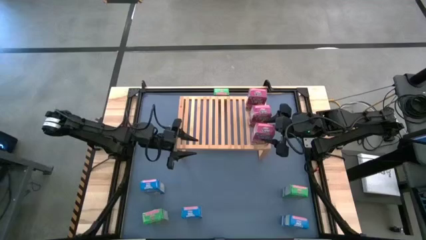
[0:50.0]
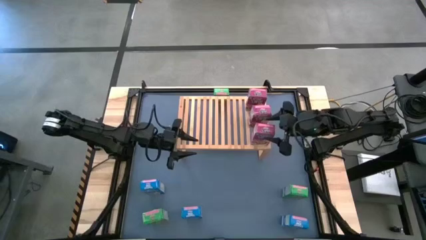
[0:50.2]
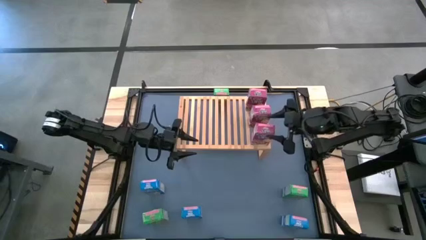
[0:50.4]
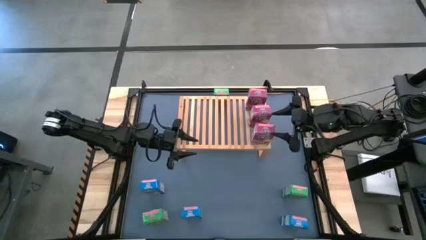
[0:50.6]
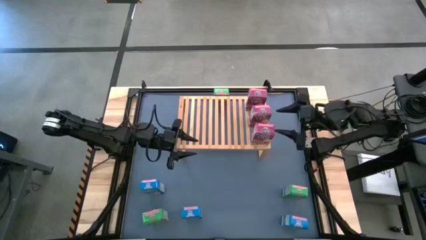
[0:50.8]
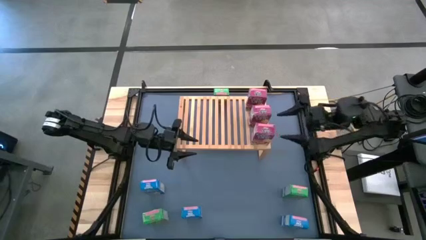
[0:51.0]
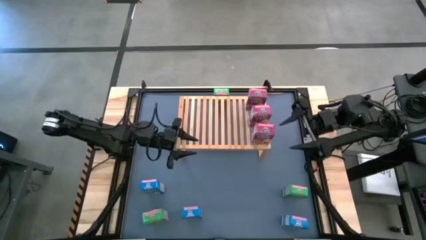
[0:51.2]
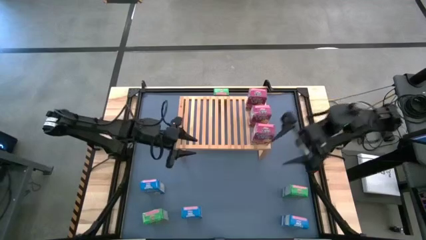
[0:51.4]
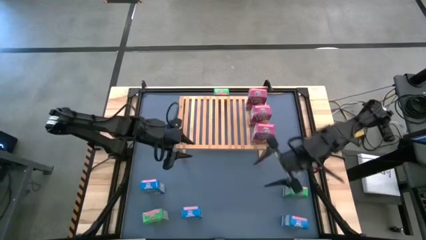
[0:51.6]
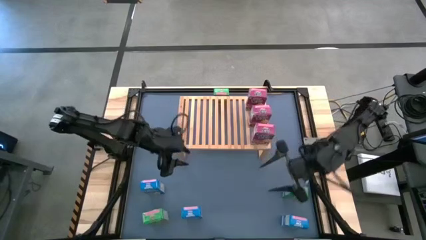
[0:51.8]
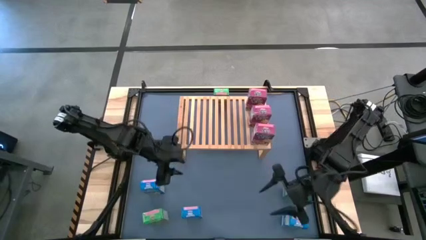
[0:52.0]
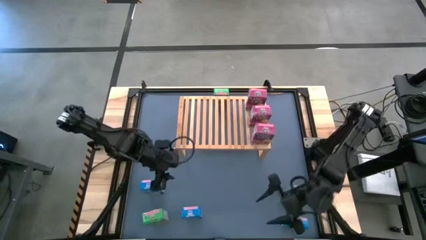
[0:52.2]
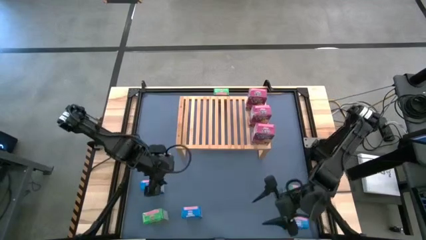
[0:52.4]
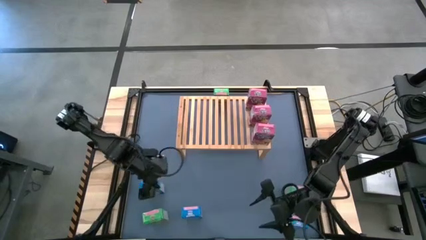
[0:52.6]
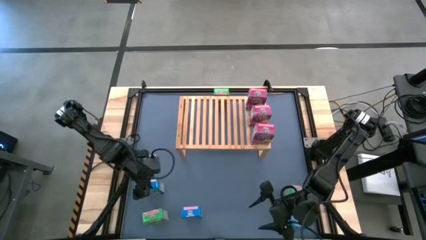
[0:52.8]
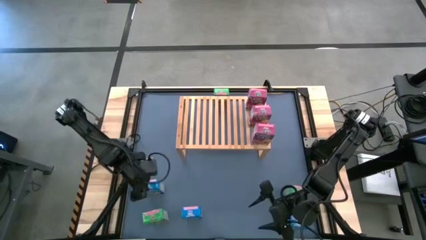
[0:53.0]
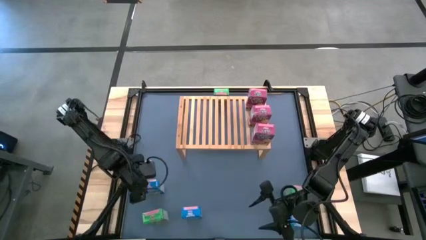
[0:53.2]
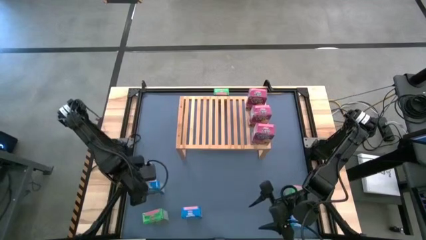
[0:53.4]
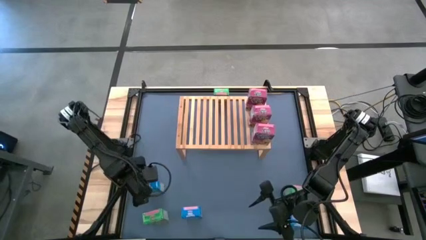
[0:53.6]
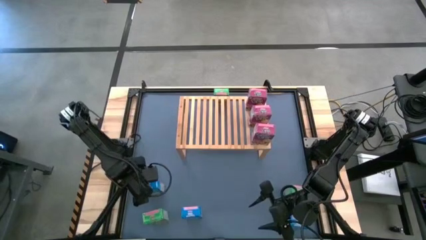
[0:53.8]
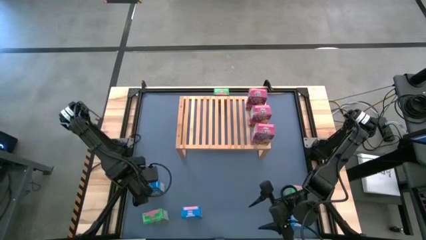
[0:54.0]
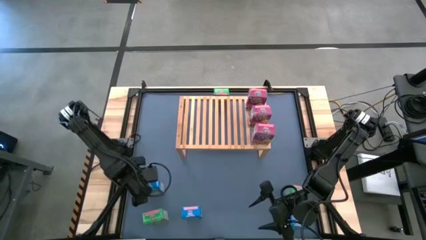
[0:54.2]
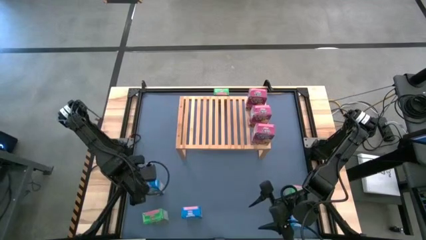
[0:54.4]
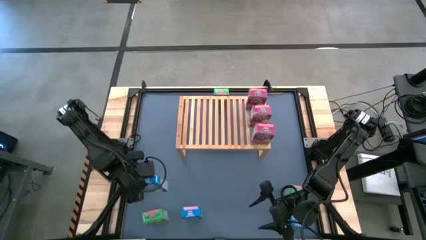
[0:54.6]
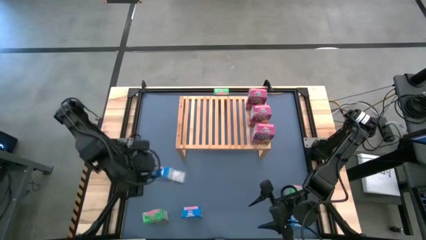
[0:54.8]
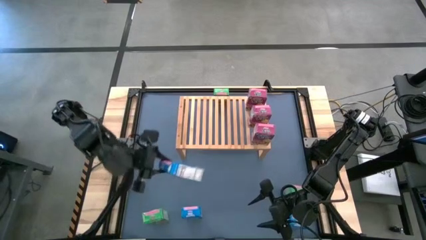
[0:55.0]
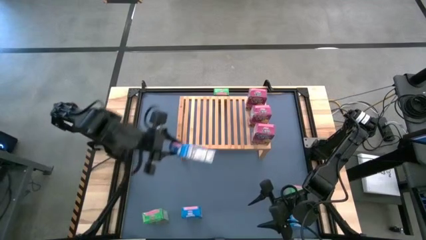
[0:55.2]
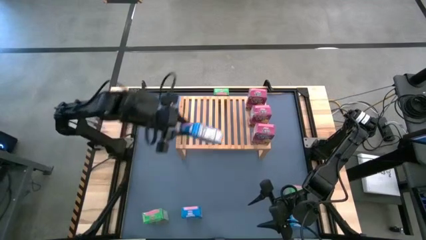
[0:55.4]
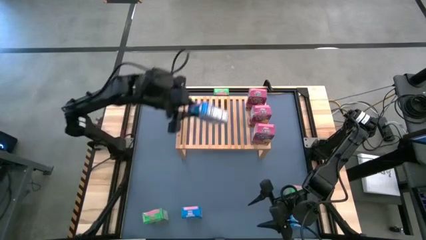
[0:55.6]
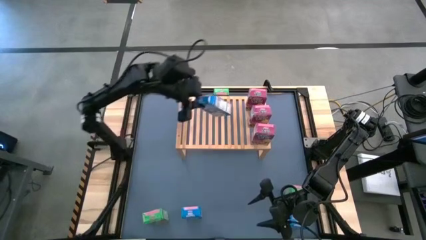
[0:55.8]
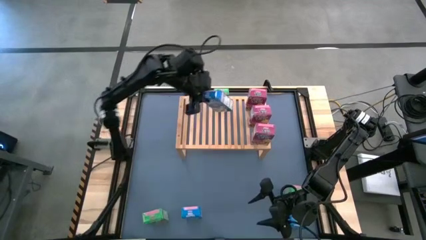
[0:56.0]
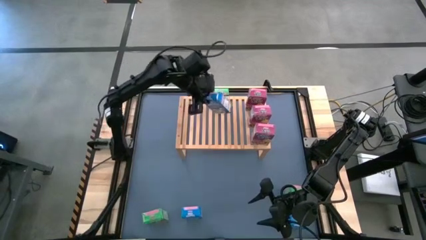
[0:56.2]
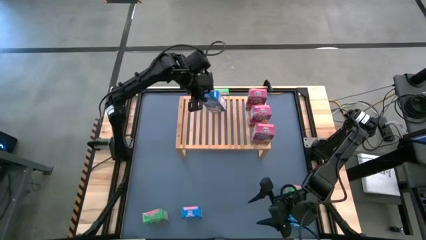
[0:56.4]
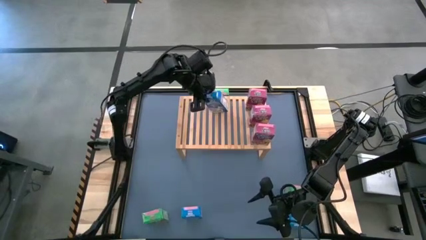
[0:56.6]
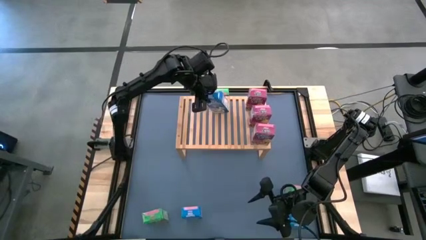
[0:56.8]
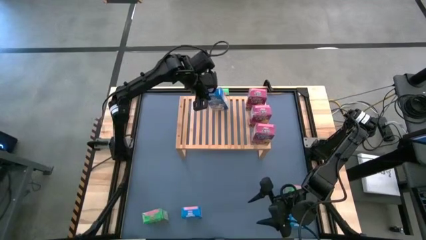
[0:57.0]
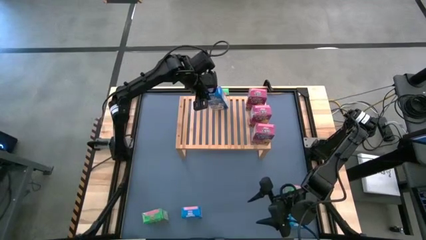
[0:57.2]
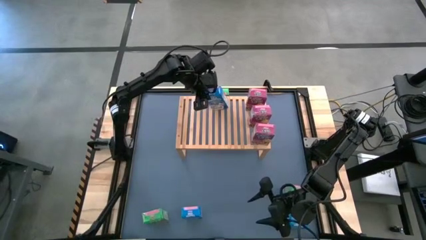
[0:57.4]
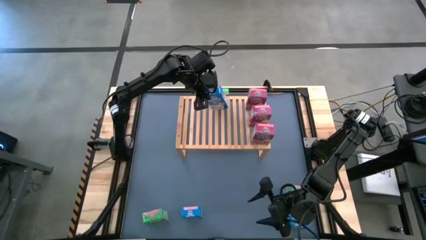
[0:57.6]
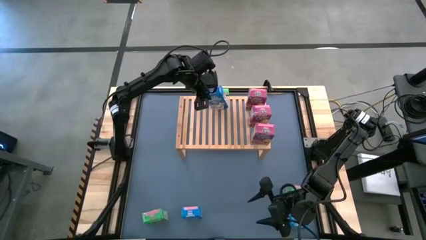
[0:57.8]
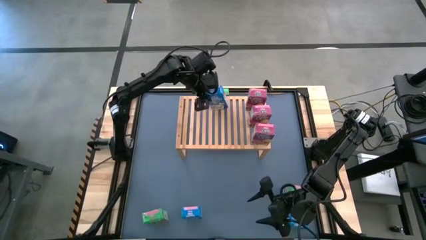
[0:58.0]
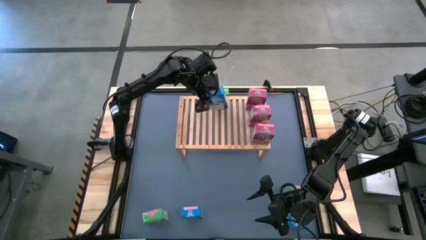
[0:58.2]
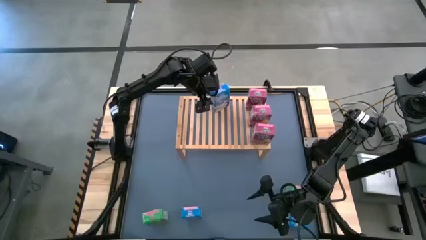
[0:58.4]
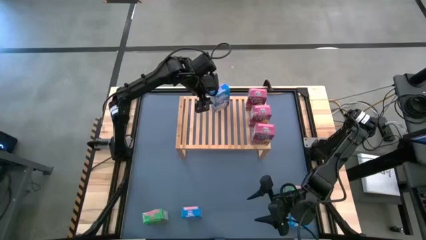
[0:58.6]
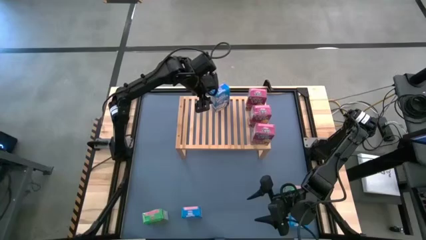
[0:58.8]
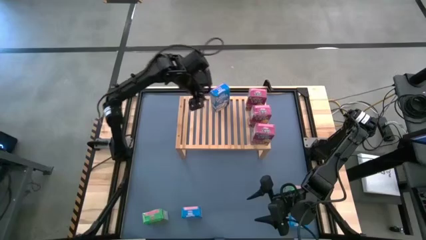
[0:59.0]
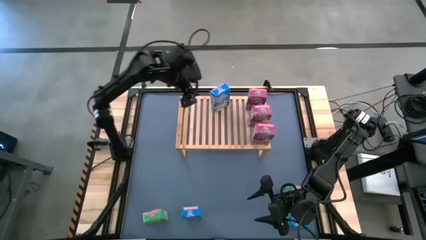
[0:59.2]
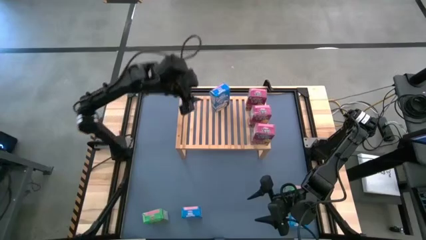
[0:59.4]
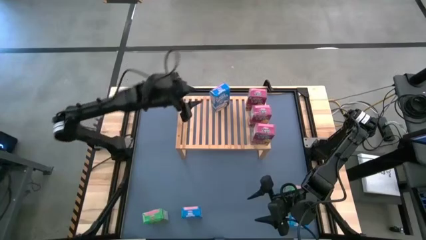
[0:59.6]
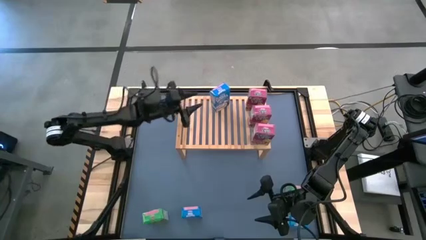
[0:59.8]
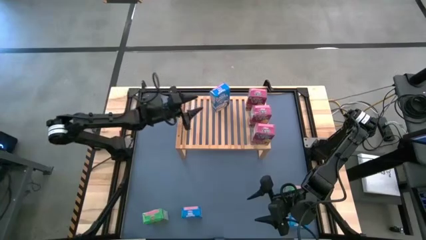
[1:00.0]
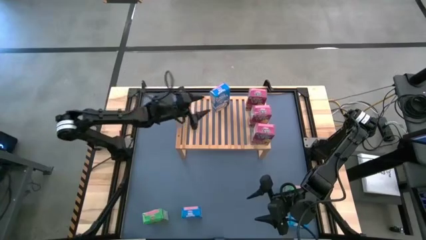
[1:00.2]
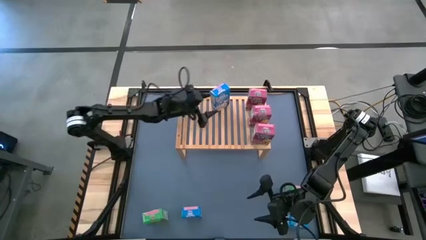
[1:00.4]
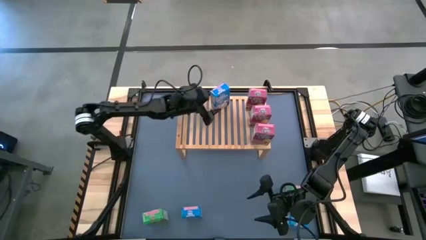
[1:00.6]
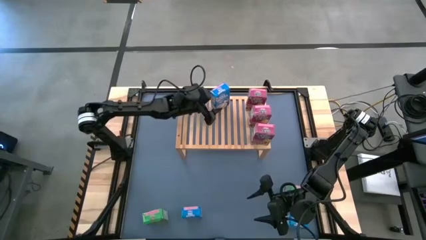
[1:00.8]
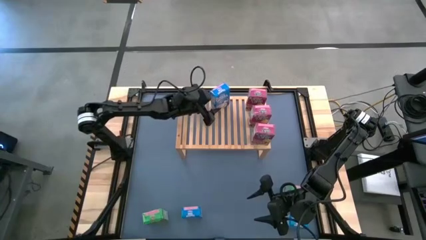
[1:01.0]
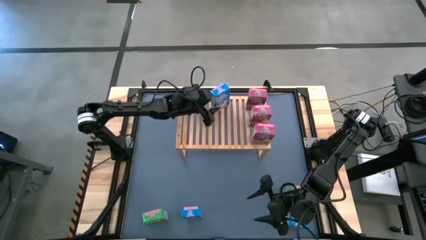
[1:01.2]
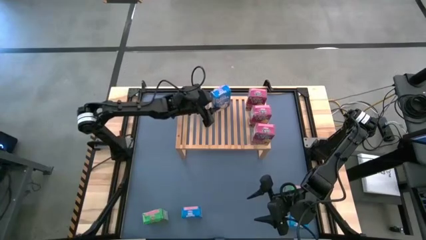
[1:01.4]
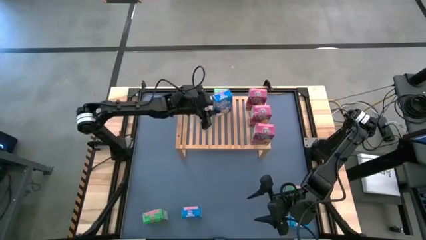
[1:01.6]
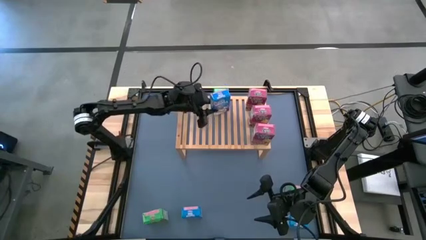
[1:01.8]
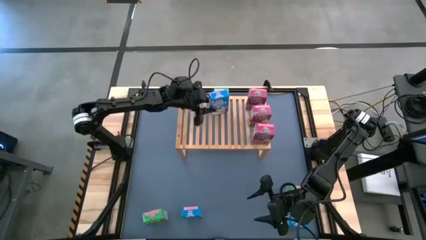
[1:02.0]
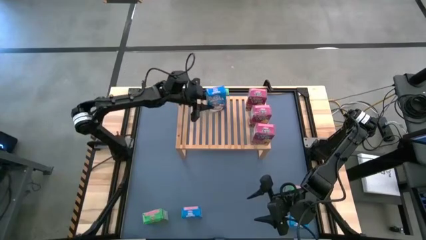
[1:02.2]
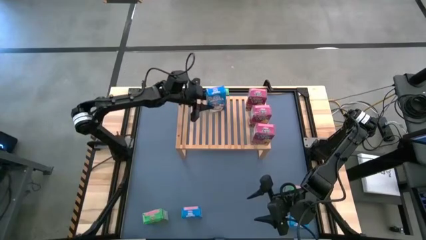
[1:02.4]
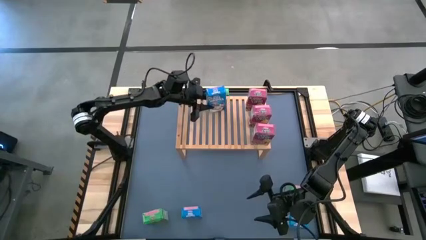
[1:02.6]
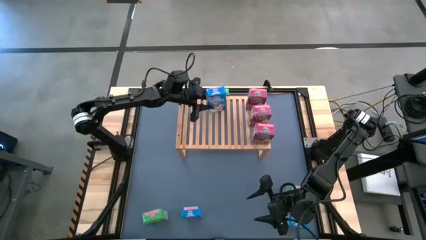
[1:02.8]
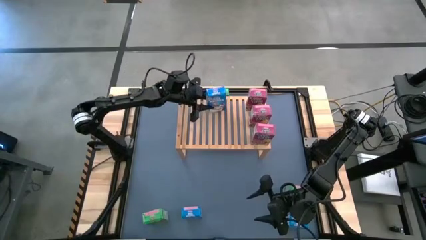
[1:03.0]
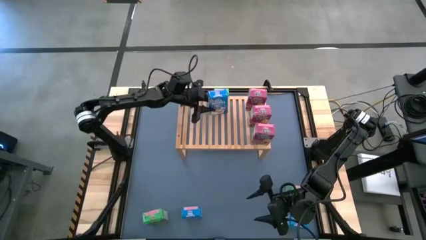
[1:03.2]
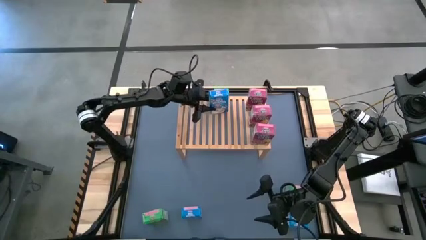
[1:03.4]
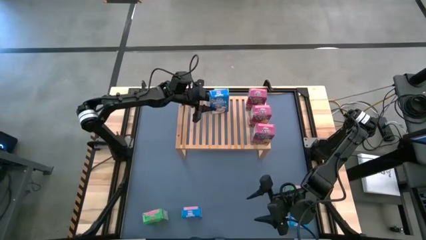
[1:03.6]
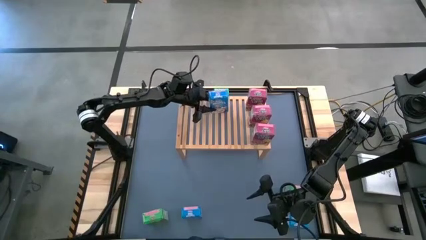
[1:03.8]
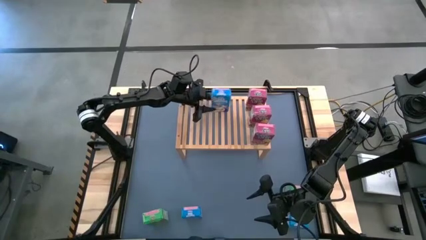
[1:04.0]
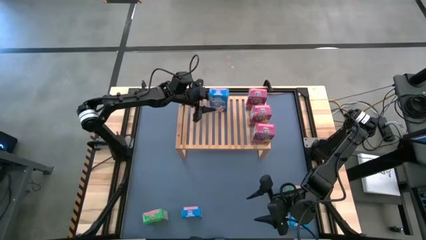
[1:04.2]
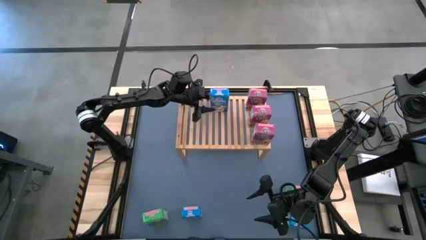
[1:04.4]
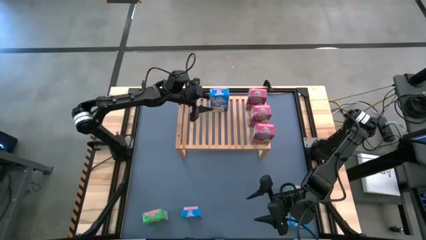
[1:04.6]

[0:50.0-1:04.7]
Task: Stack cereal on shelf
Put the top left blue cereal box on the shelf

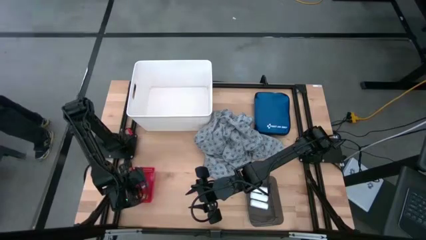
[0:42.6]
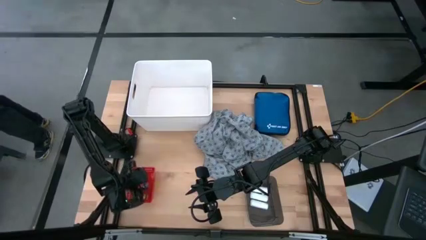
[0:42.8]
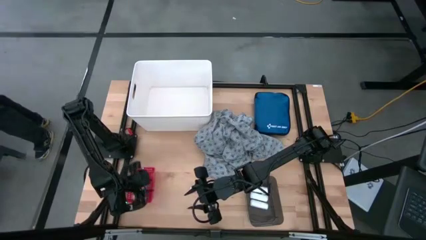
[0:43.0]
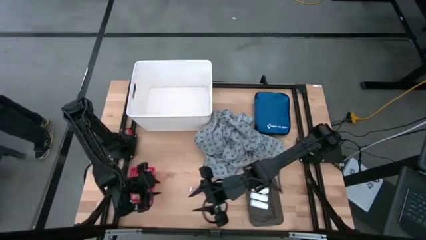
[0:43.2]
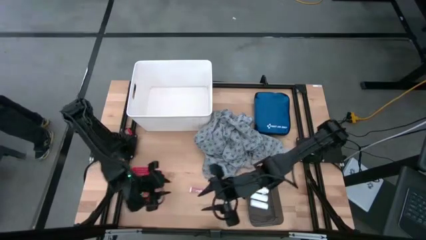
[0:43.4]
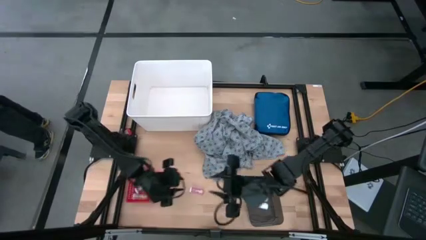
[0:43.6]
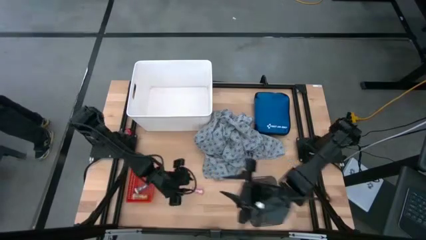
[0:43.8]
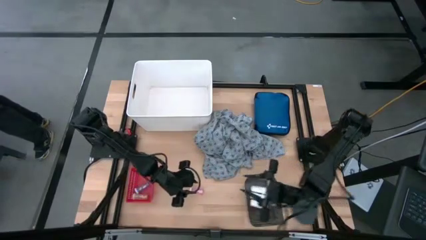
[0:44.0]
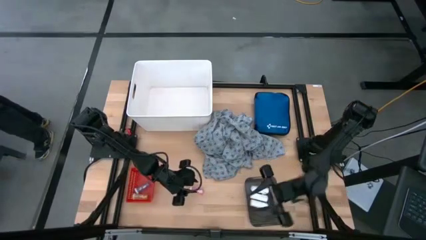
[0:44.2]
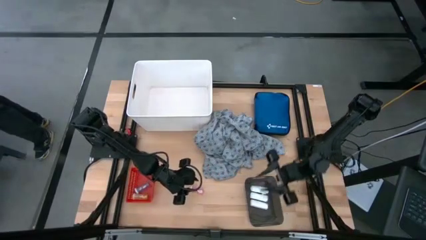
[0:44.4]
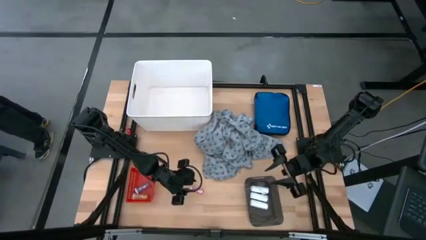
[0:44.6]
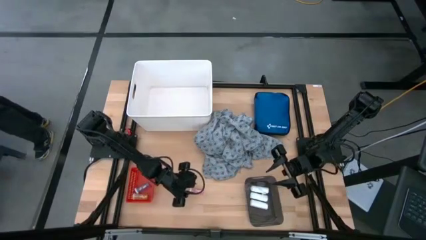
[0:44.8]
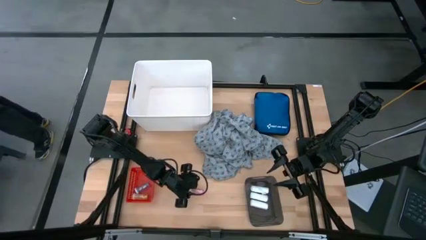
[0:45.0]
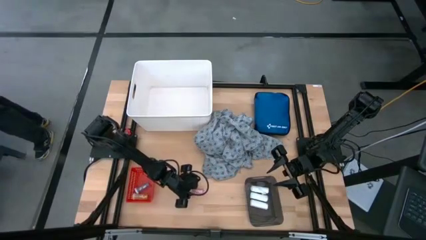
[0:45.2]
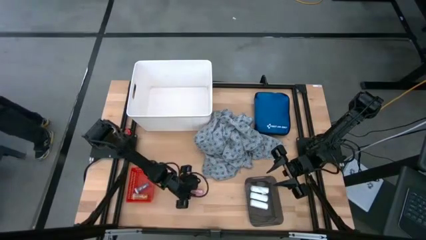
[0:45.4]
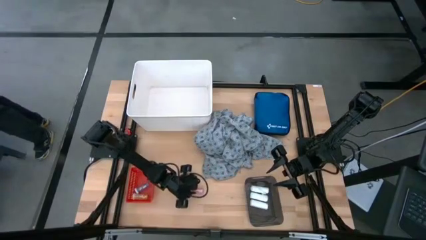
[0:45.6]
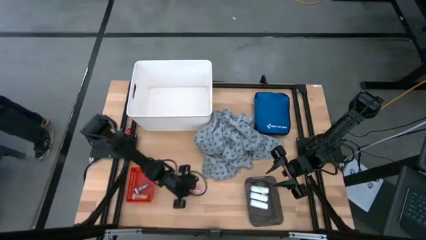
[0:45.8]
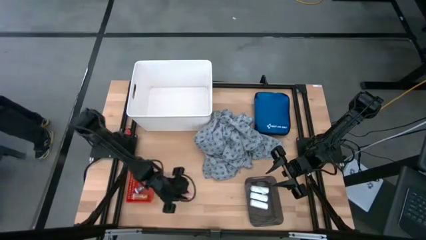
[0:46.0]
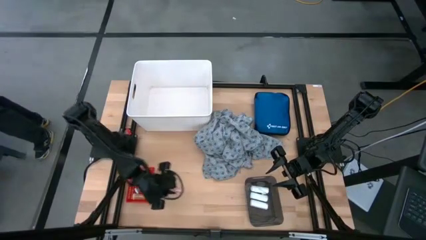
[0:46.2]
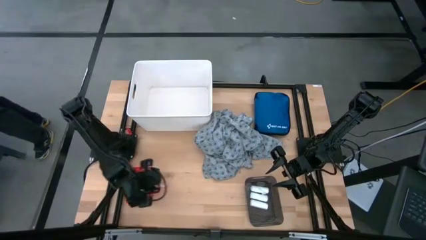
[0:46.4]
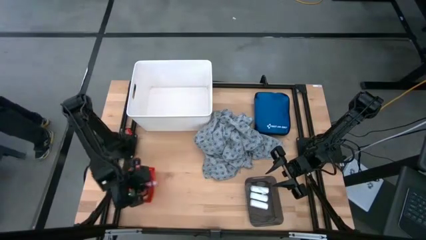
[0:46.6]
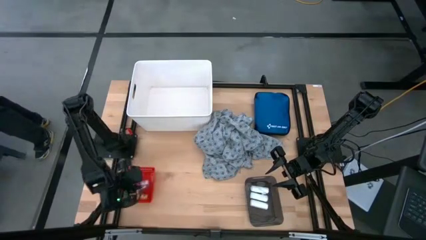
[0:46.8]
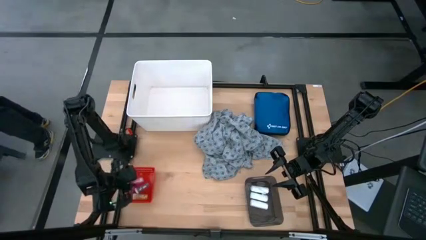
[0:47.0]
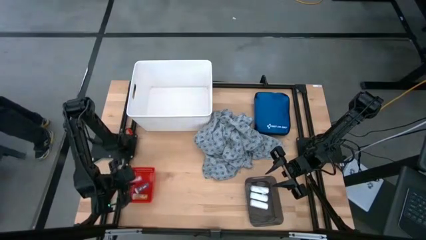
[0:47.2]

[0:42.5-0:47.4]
Task: Pick & Place Medicine items
Put the pink pill bottle into the red bin
